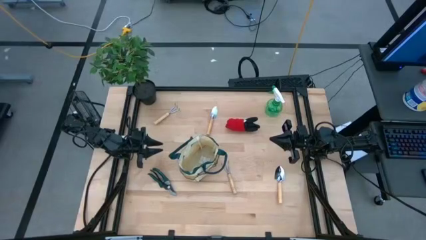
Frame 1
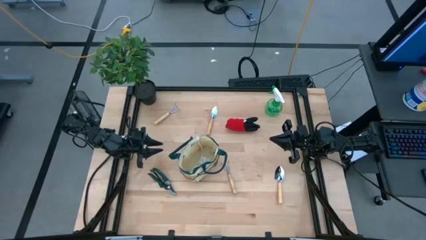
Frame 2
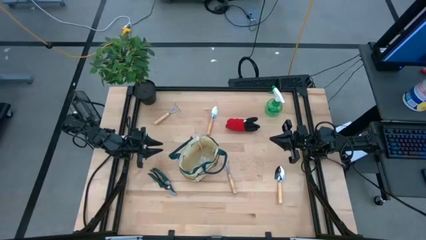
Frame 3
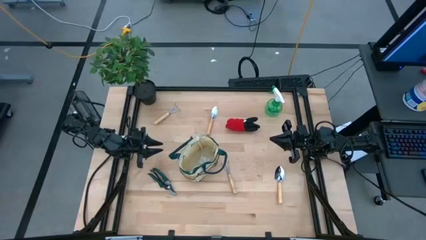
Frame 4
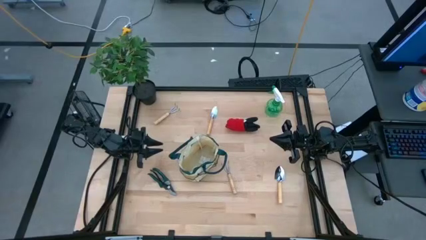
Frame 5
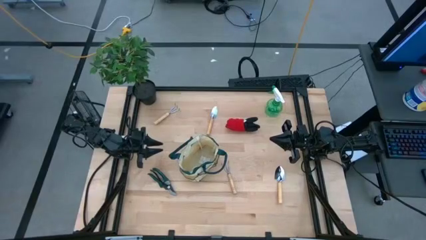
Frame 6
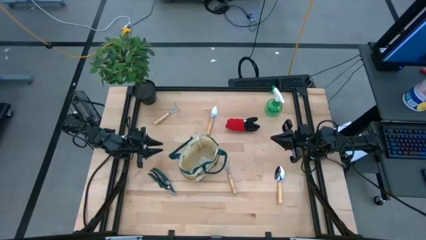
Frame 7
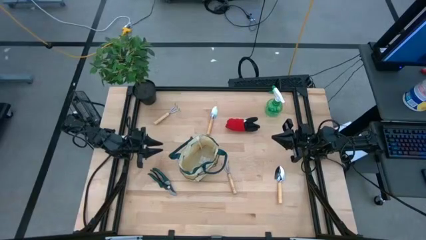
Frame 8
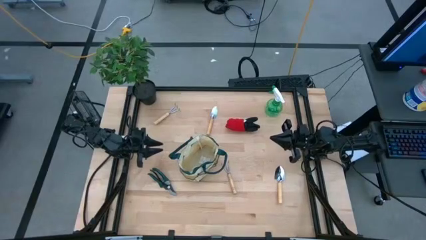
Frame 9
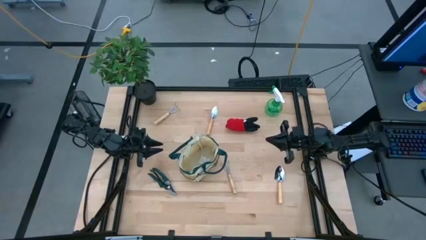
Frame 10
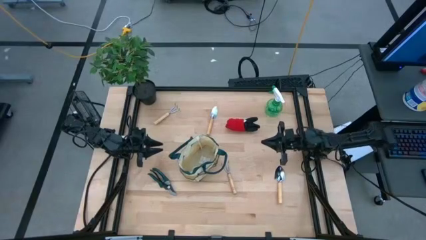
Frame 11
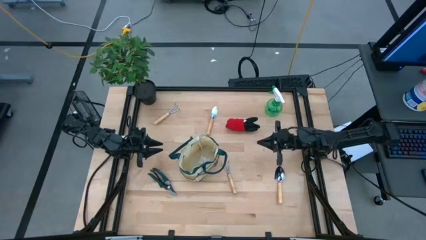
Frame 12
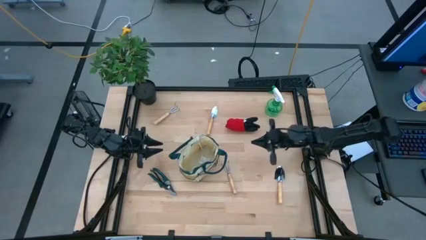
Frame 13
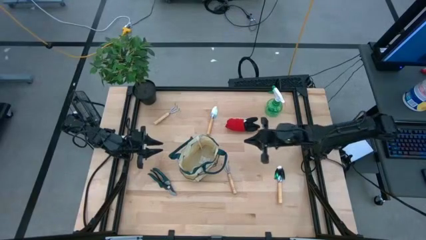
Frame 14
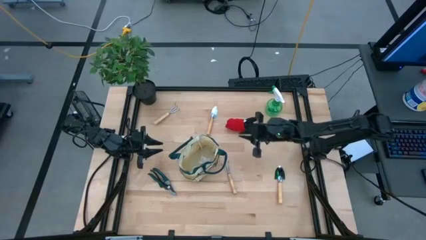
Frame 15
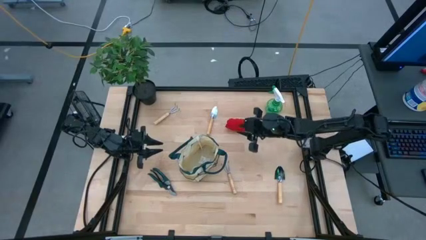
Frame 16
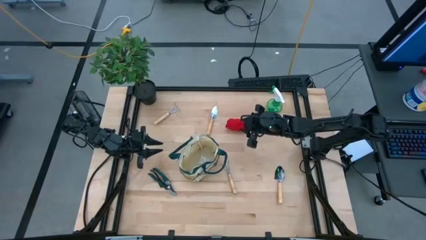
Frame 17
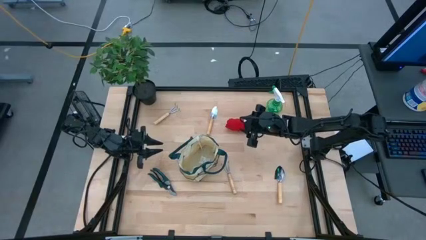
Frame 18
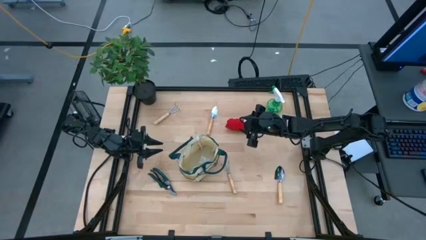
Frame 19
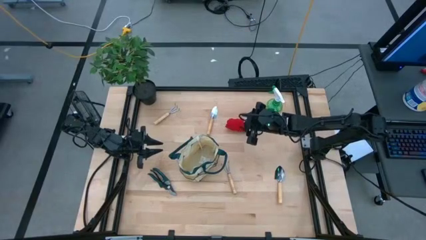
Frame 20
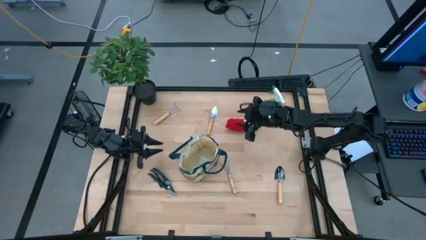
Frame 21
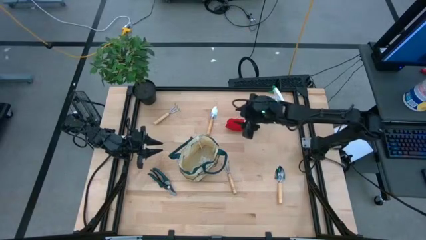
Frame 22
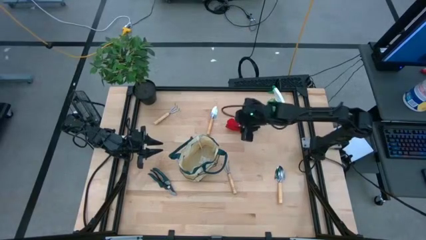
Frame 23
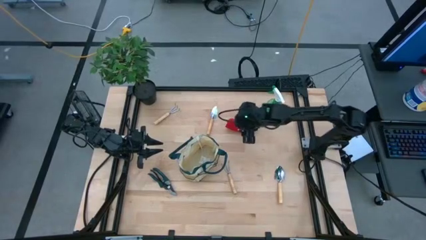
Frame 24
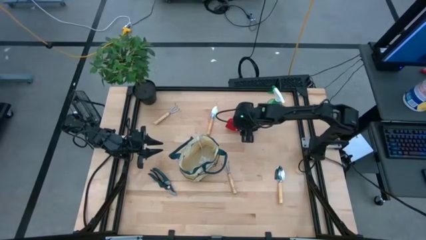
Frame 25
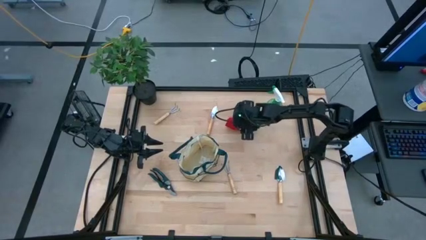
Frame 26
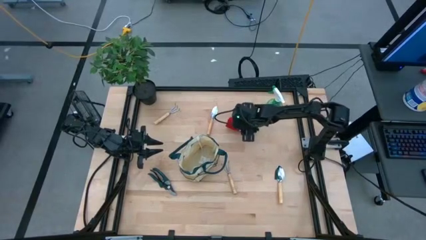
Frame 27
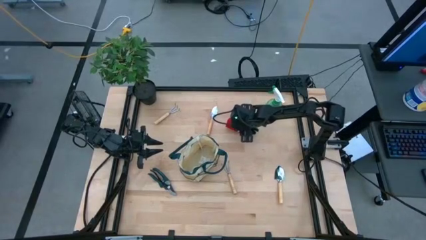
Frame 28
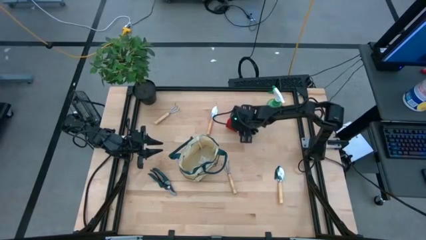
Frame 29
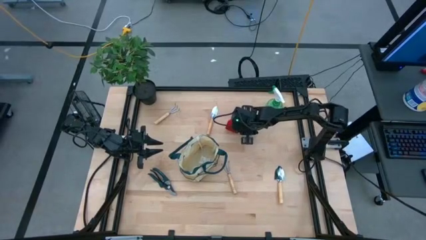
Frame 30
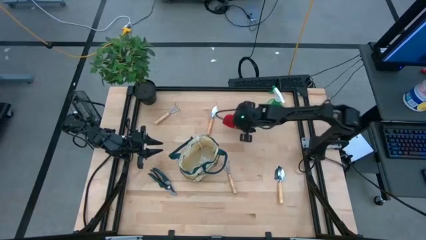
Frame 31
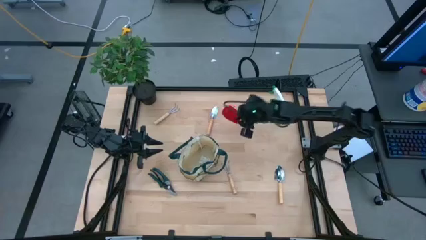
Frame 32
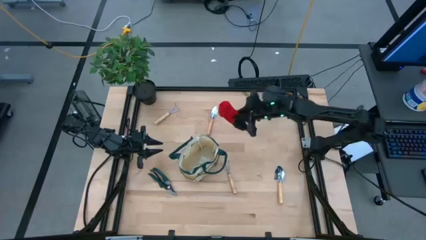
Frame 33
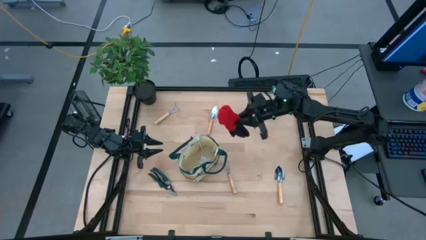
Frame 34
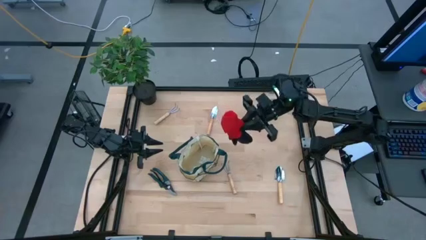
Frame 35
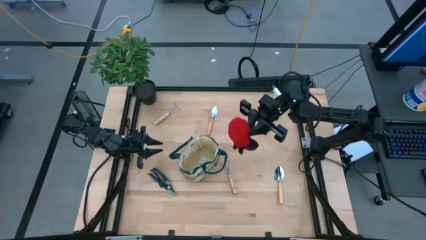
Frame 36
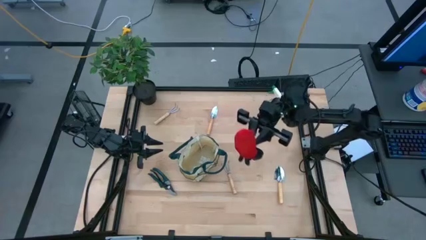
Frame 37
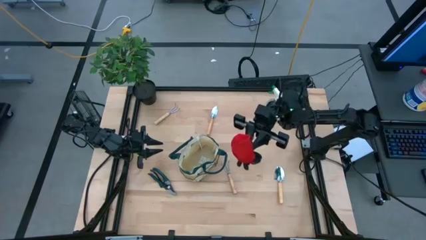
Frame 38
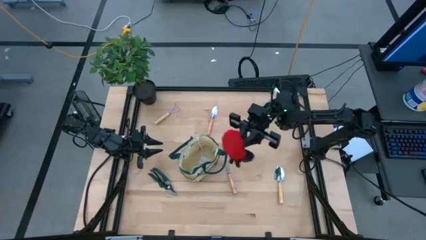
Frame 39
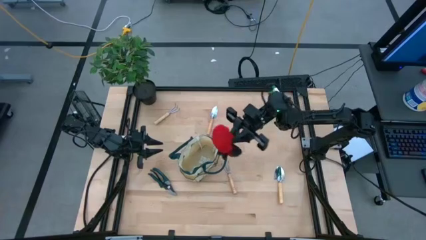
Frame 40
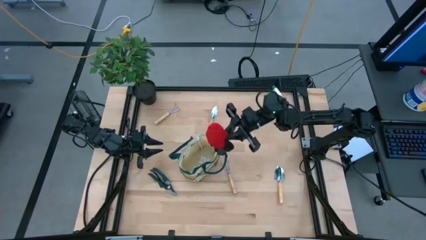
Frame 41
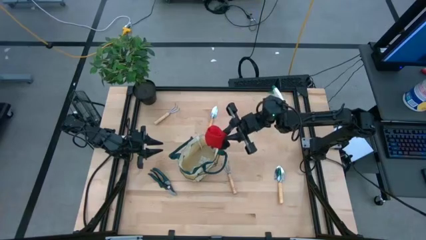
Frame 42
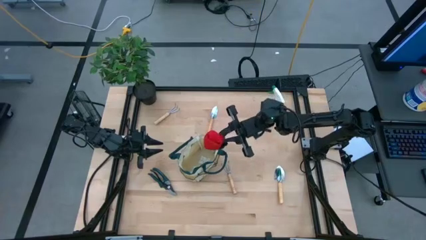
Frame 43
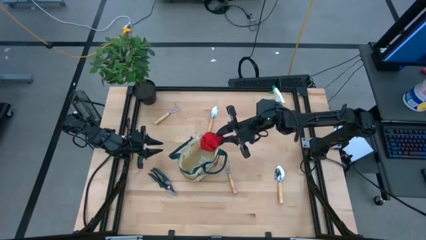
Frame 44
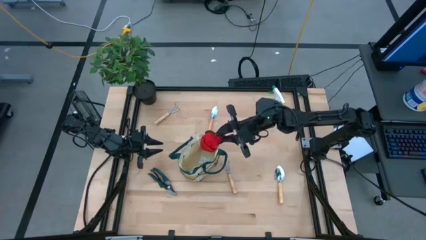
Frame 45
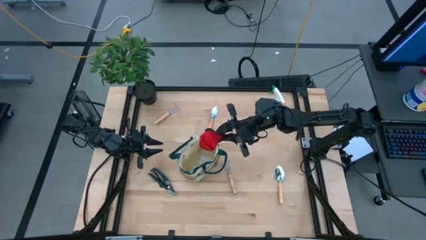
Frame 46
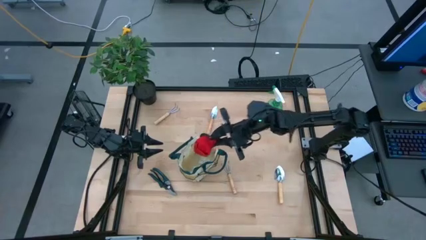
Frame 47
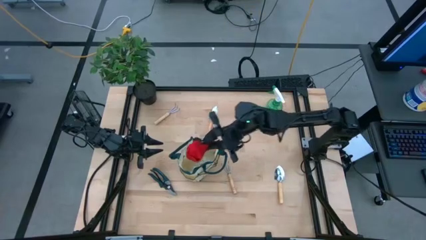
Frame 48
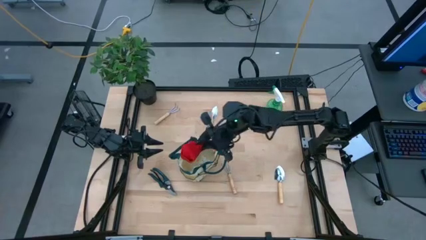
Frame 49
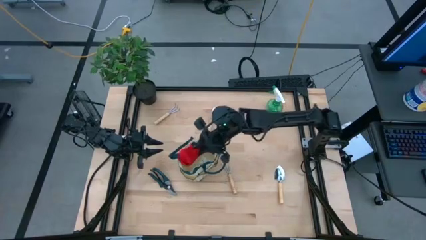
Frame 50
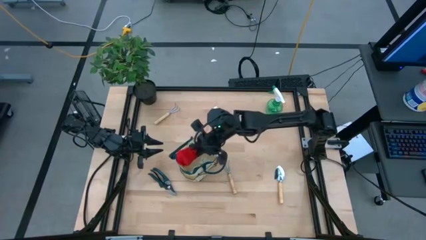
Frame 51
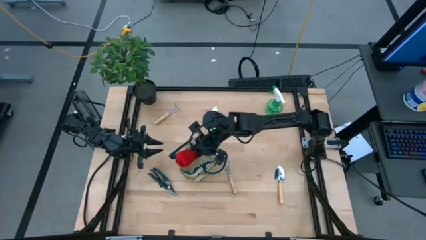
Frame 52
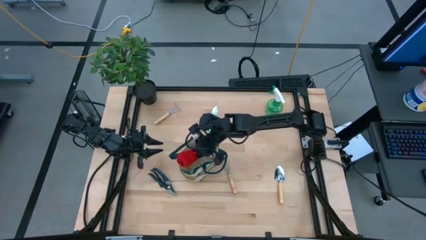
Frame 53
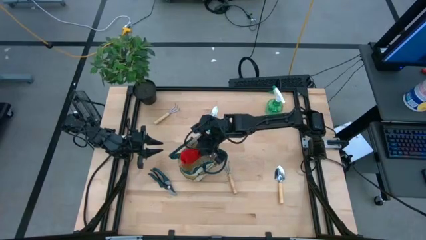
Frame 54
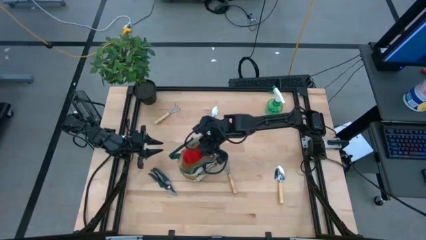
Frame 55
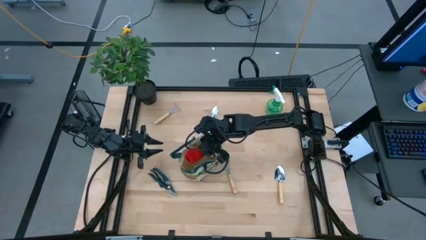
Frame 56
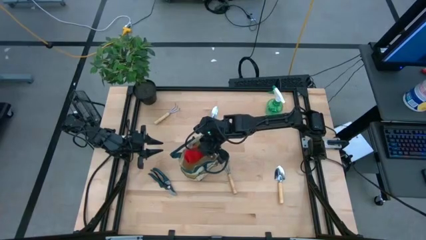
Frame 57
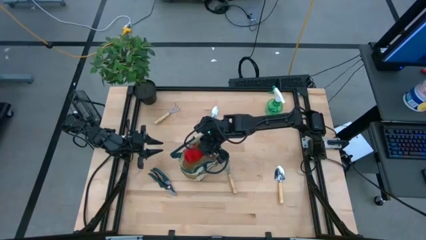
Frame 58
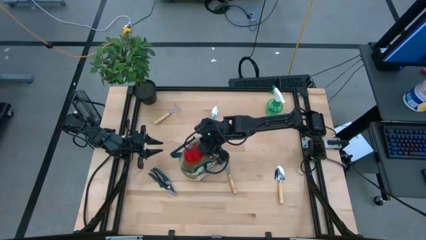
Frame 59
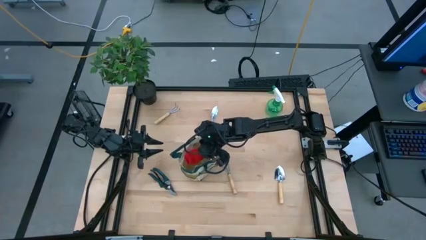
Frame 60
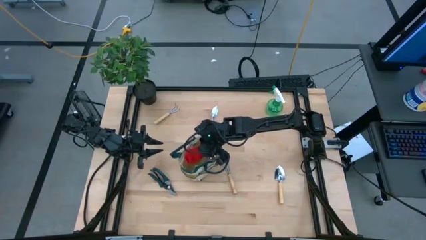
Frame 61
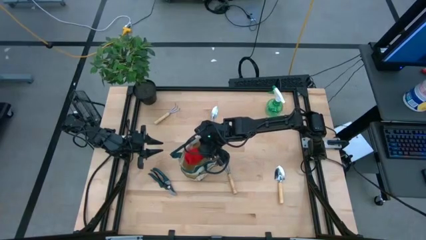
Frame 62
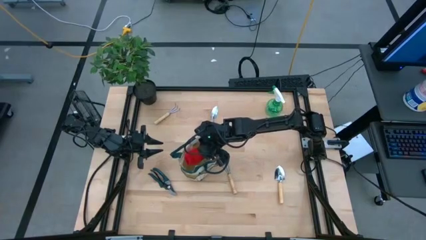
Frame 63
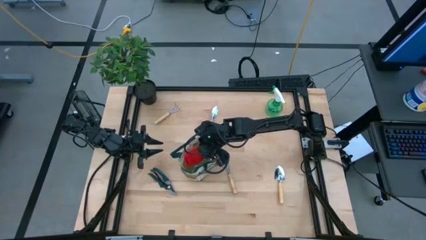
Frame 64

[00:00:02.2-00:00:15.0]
Task: Pick & Place Garden tools in Gardening bag
Put the red glove into the brown bag
